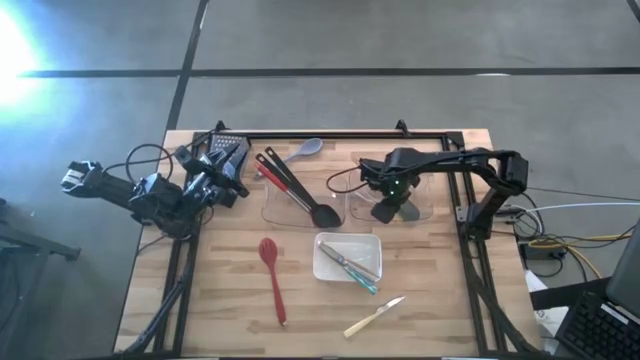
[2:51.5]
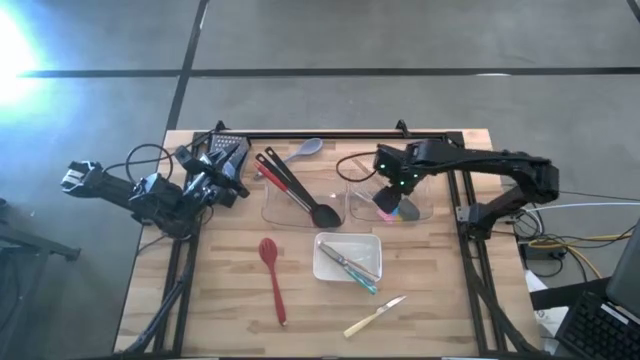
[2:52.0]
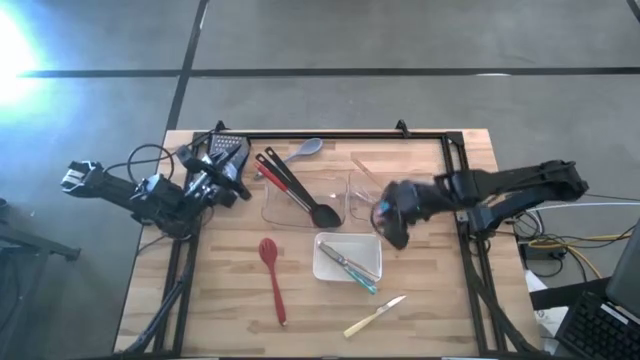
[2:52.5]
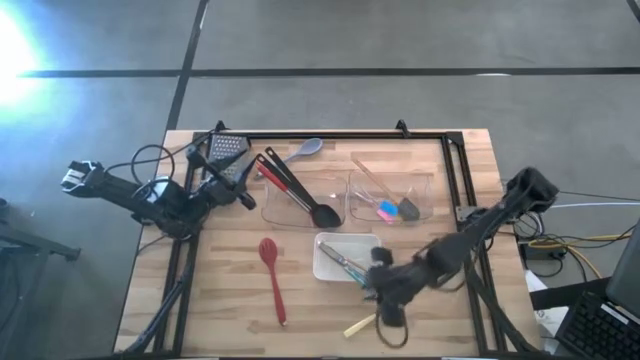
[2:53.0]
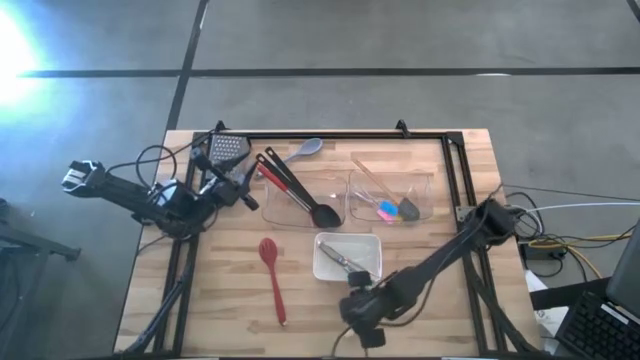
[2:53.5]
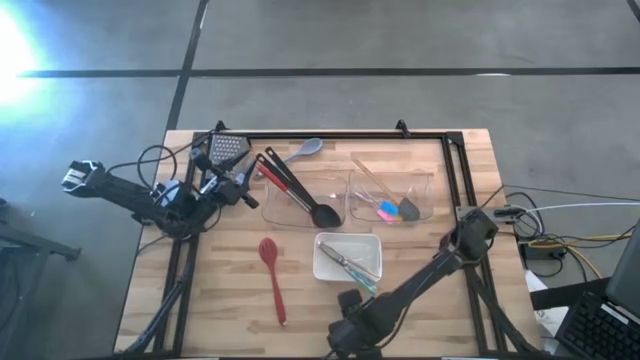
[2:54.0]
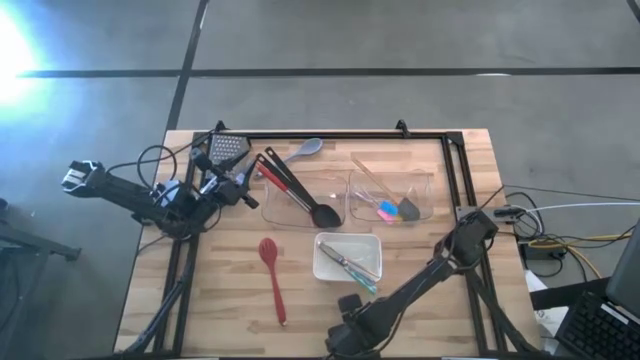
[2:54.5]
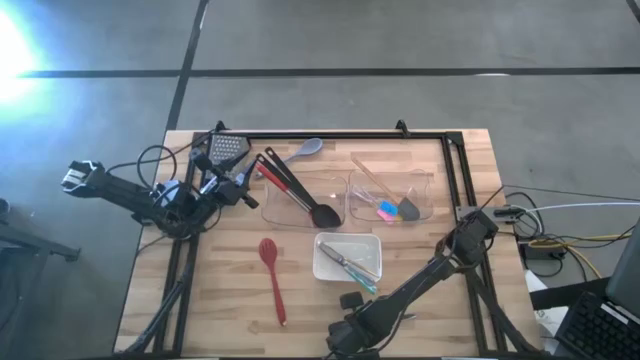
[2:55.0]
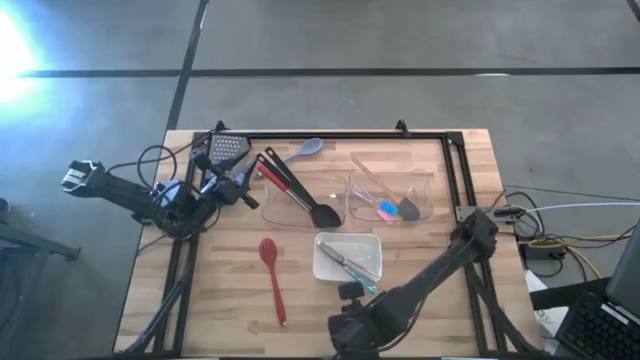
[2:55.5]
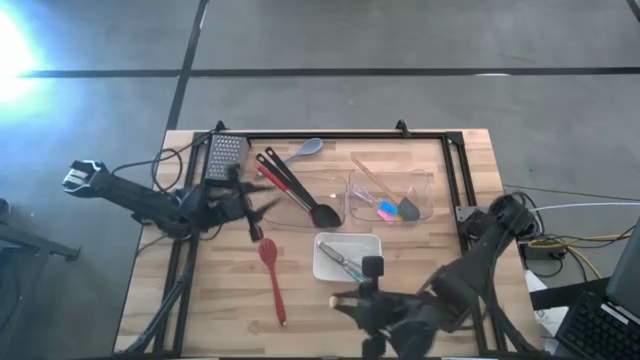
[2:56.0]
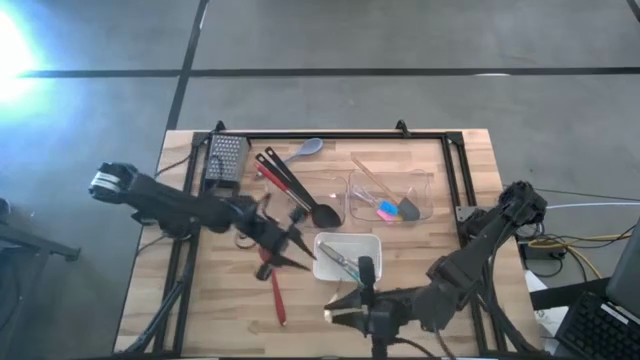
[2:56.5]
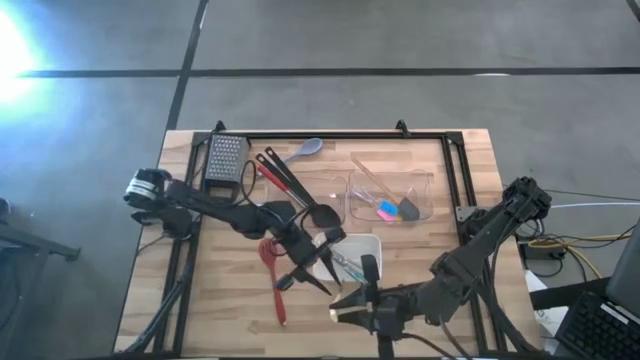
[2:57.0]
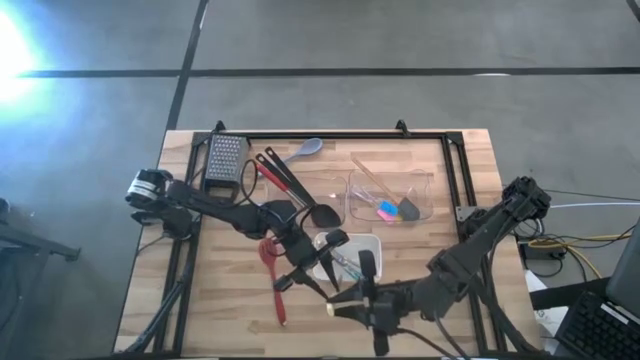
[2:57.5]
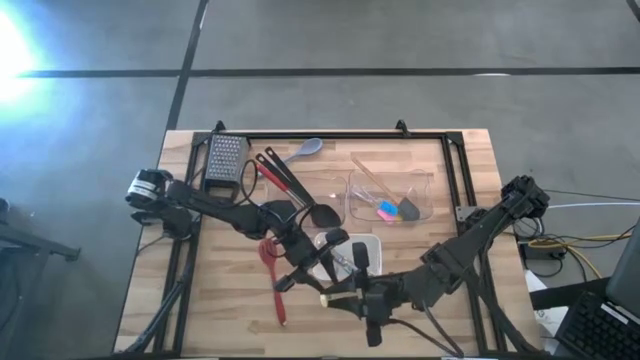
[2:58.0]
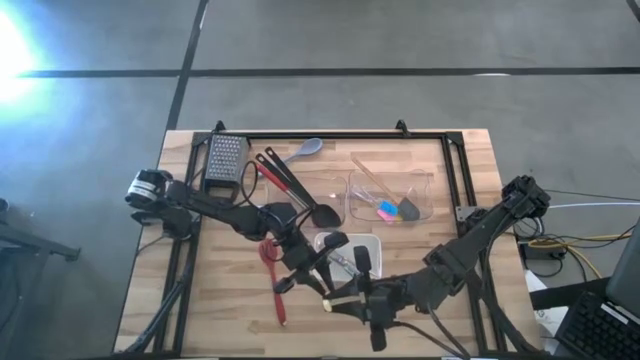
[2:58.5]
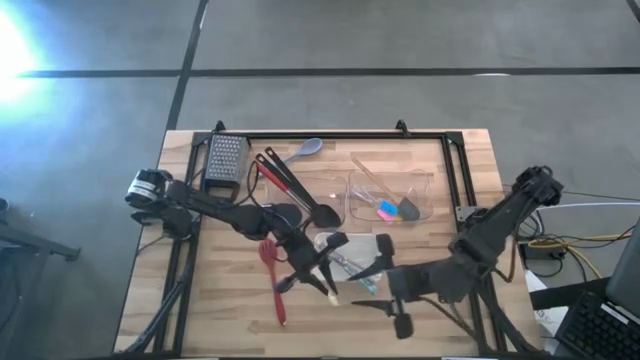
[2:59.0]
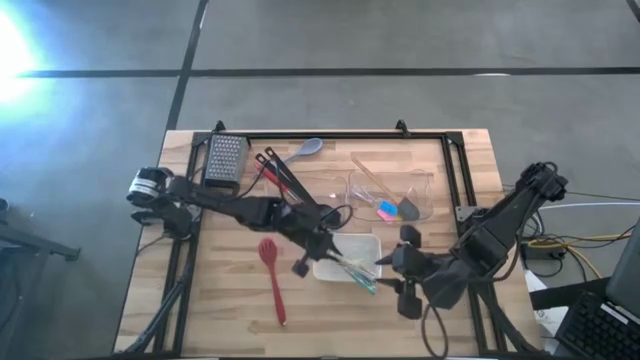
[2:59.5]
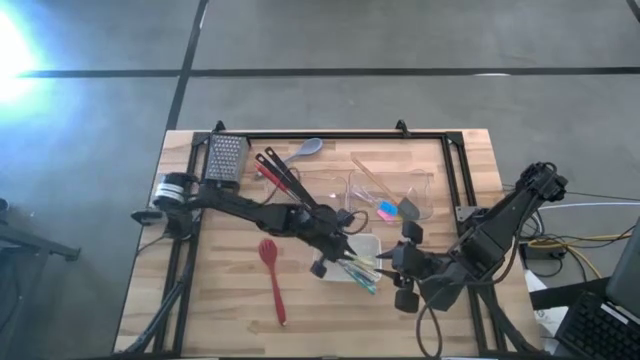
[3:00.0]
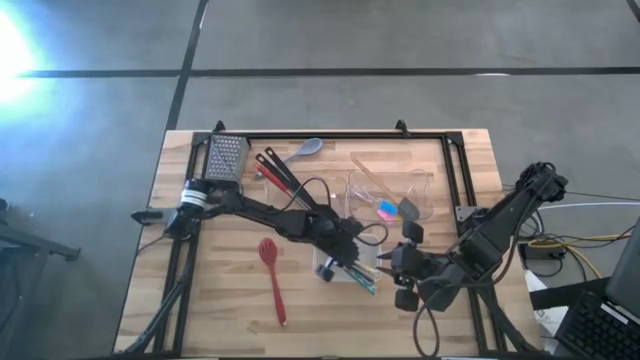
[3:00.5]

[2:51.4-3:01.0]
Task: Pick & Place Kitchen Items
Put the white knife into the white bin

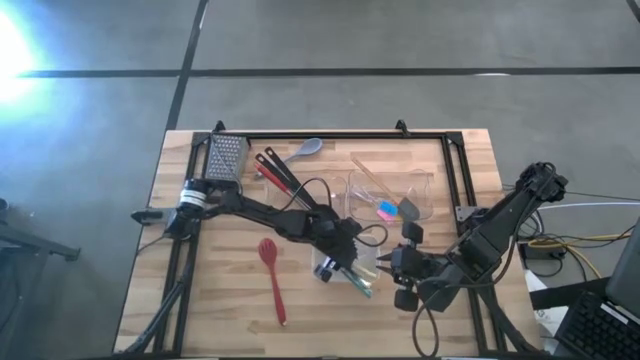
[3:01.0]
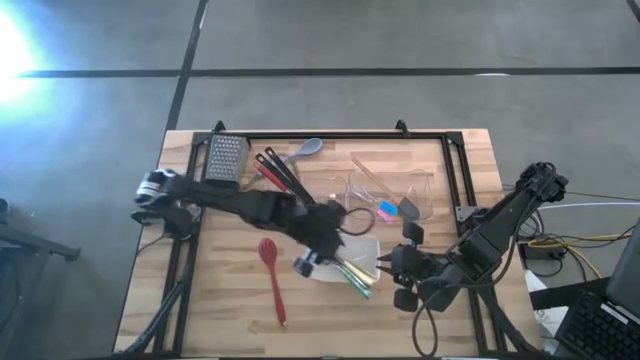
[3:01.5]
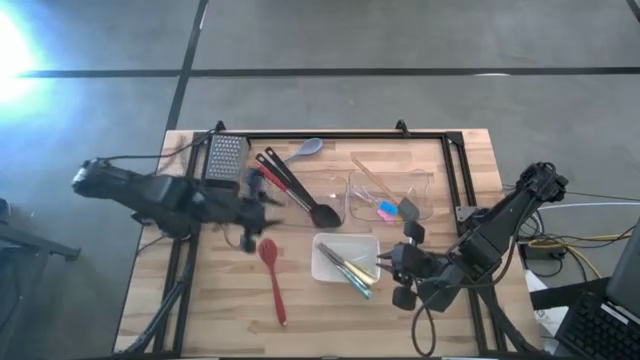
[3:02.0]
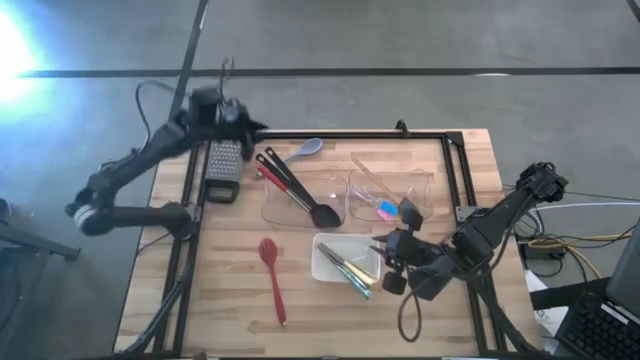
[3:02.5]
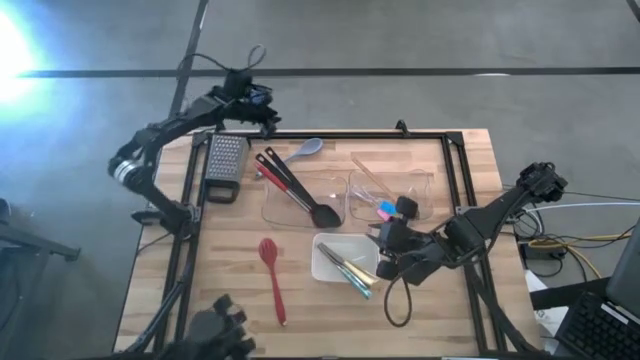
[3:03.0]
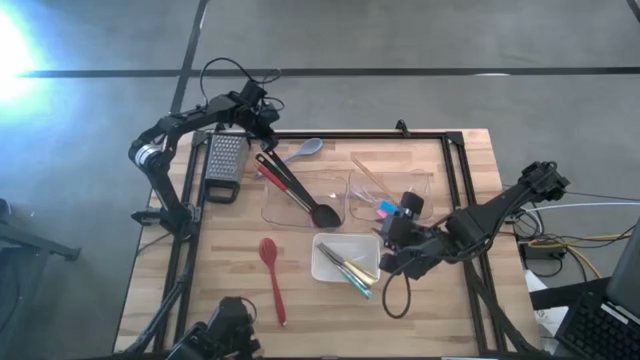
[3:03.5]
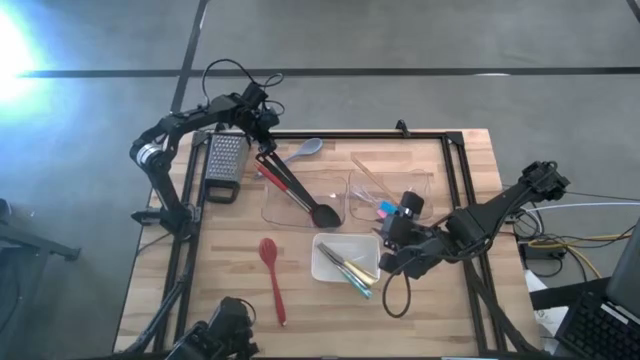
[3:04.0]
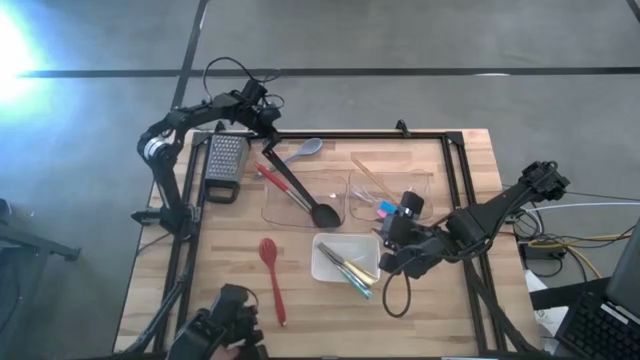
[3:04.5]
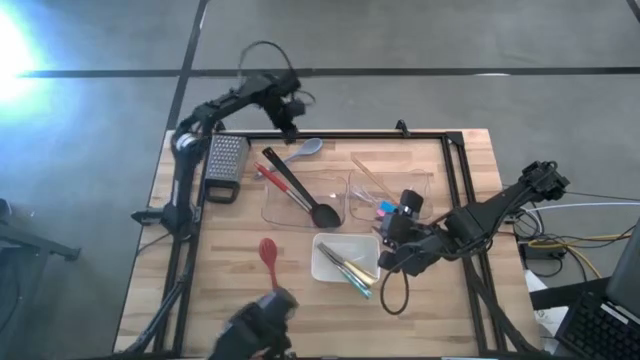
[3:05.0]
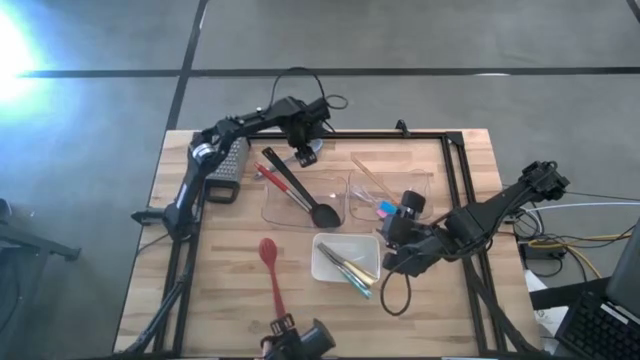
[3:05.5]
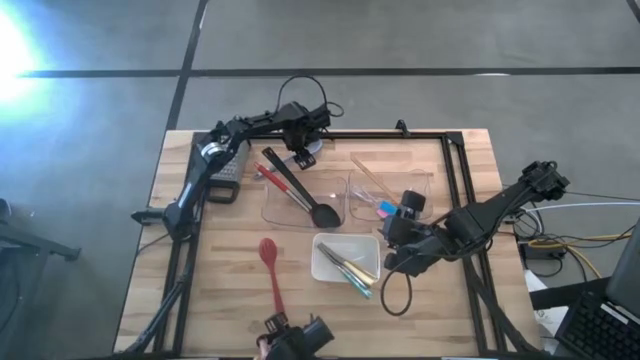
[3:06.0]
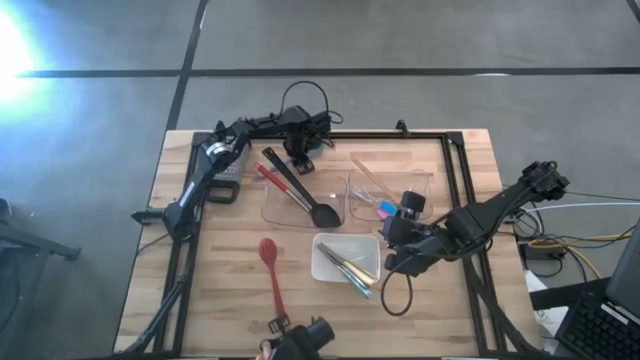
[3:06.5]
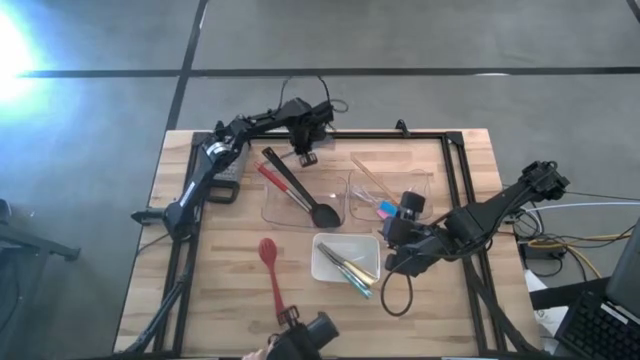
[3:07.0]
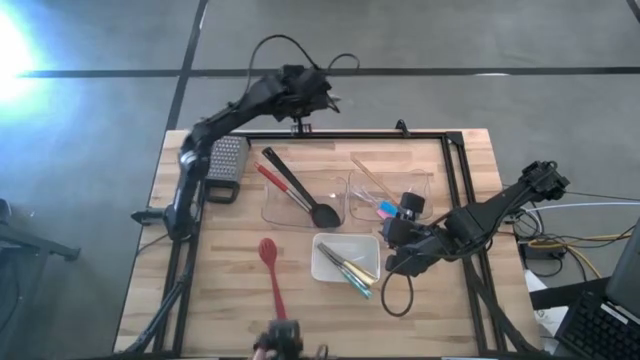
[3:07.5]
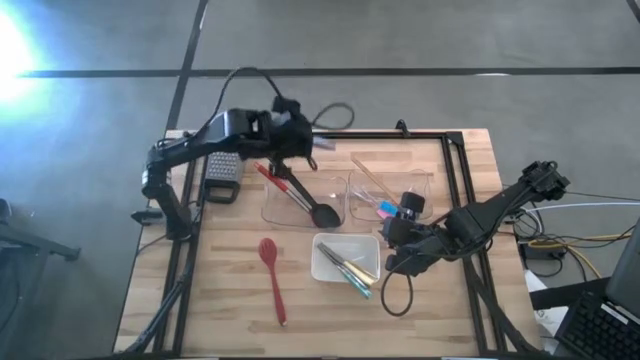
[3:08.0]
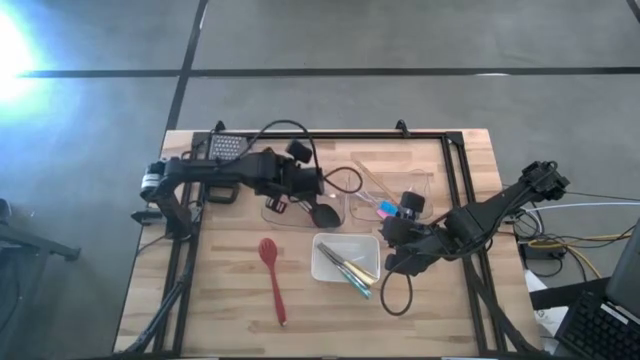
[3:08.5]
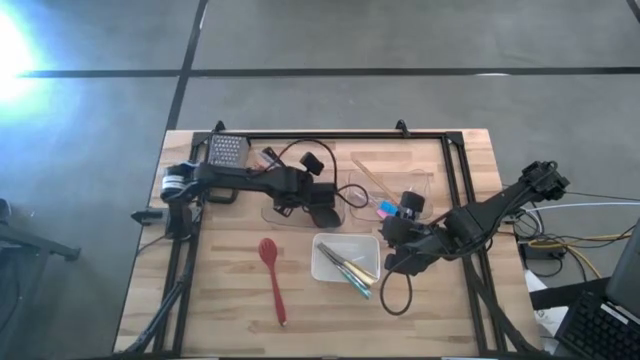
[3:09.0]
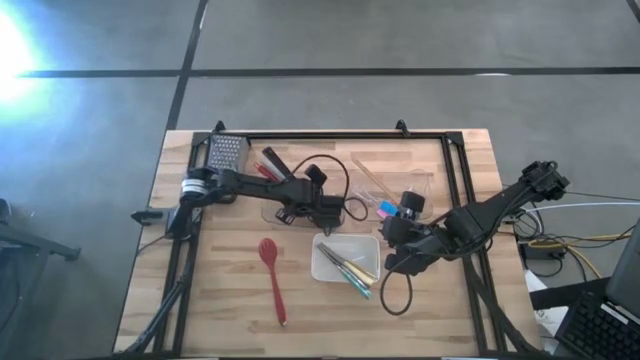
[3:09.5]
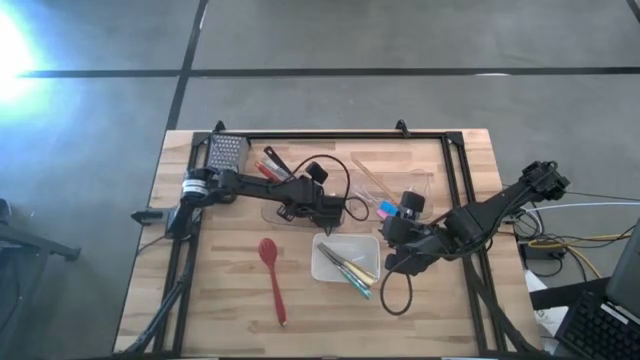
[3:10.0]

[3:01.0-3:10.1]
Put the blue serving spoon into the left transparent bin

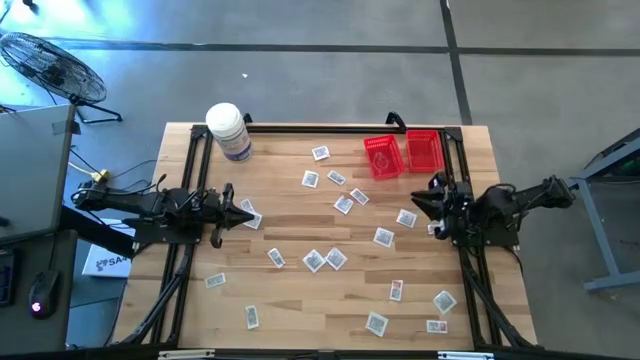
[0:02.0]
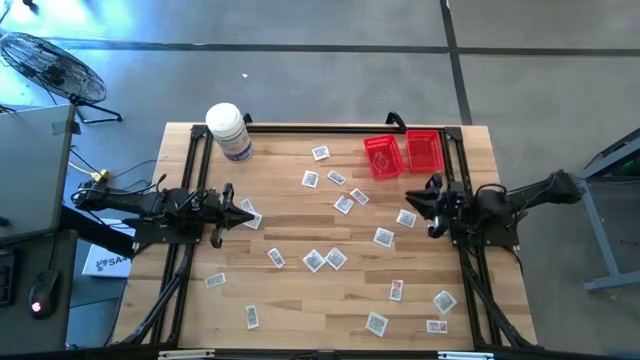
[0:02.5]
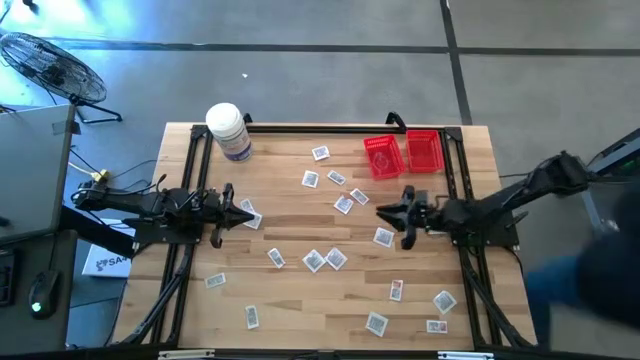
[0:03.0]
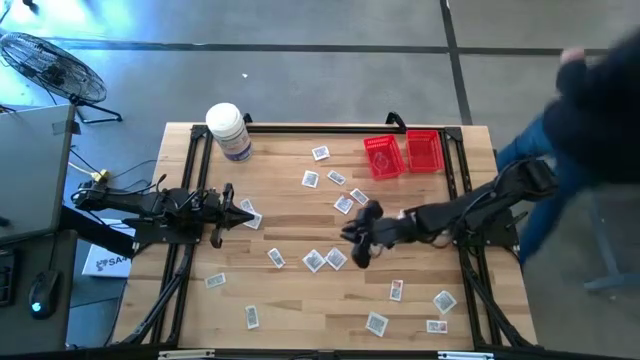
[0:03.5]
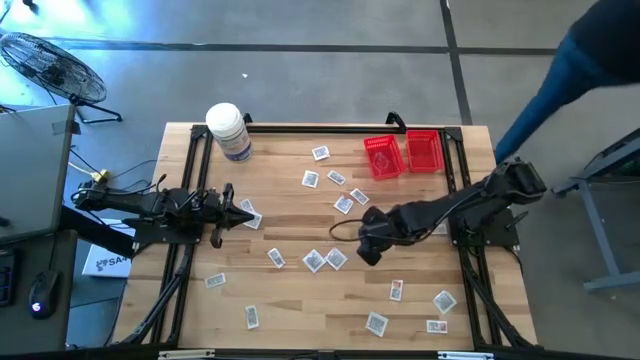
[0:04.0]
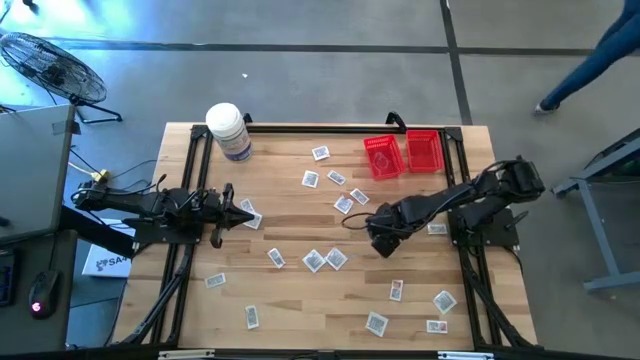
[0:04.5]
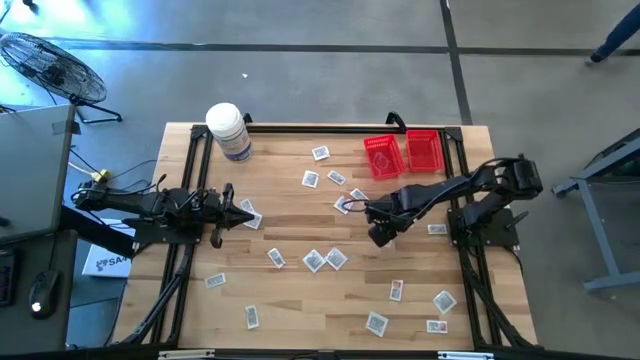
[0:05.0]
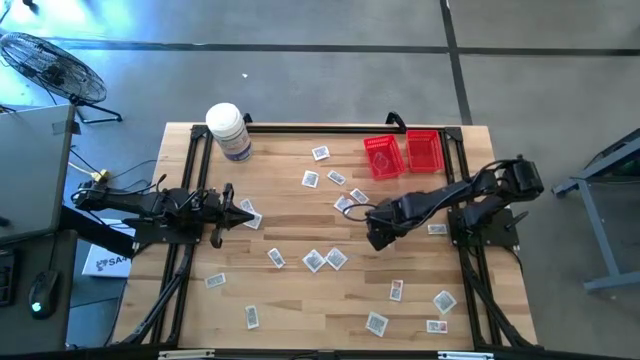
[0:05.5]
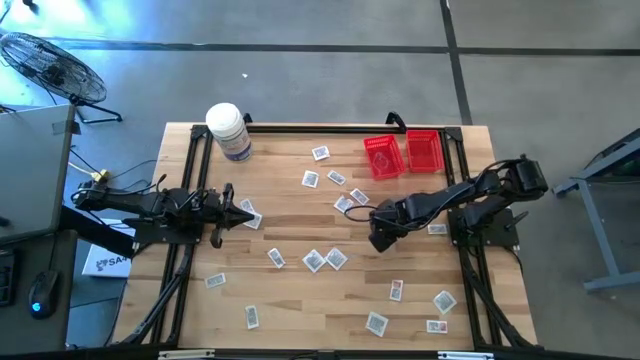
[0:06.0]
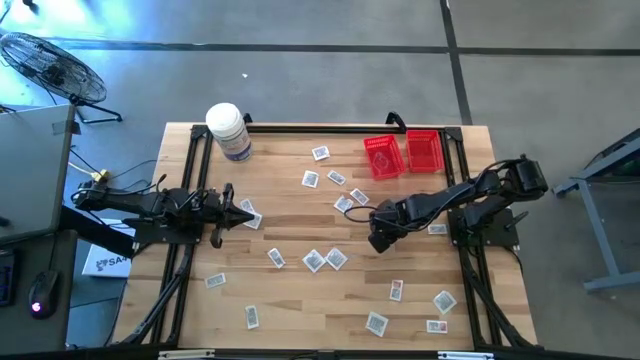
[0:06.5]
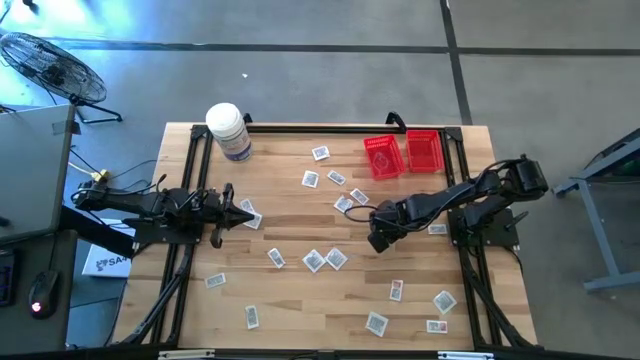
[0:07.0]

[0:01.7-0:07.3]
Task: Pick & Place First Aid Supplies
Put the towelette pack into the left red bin
